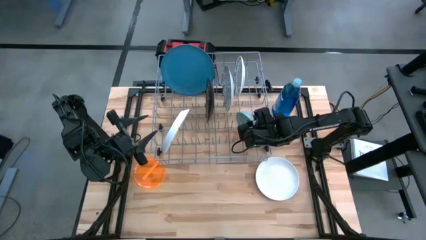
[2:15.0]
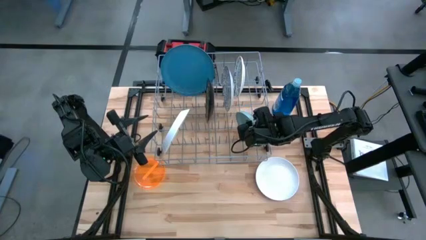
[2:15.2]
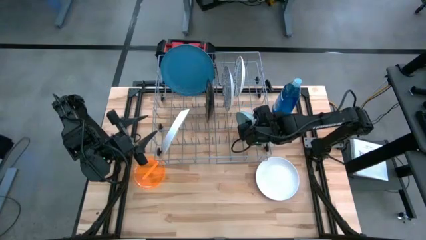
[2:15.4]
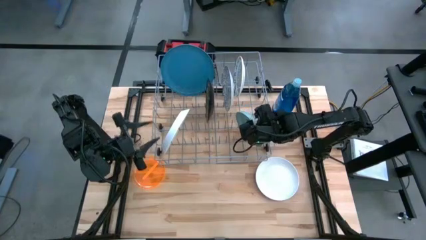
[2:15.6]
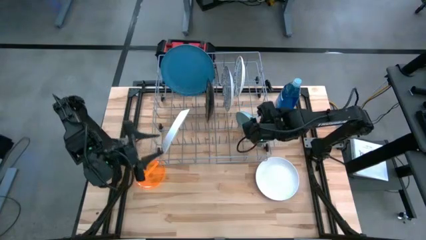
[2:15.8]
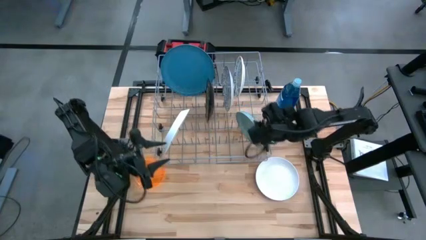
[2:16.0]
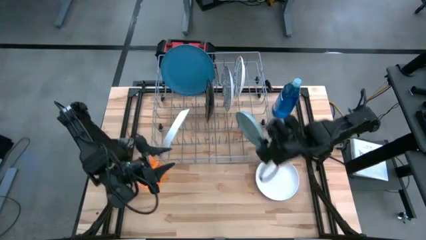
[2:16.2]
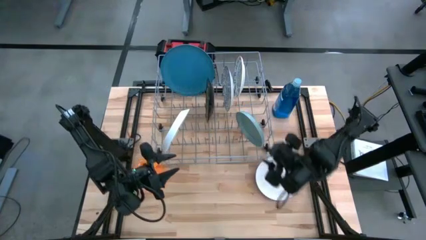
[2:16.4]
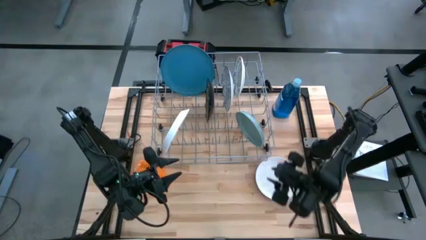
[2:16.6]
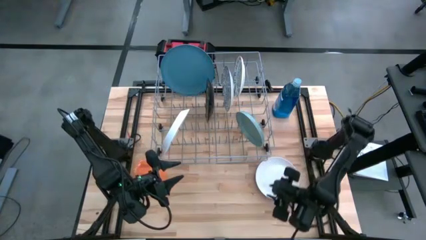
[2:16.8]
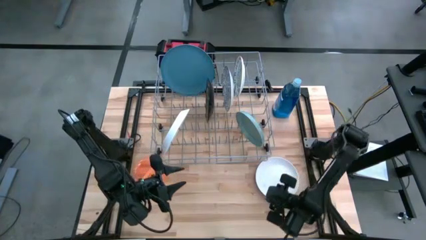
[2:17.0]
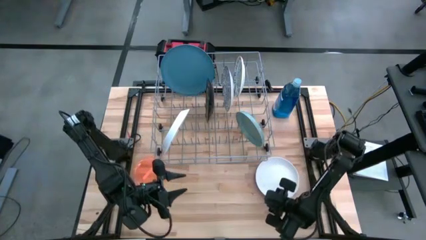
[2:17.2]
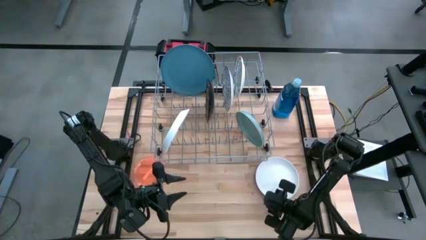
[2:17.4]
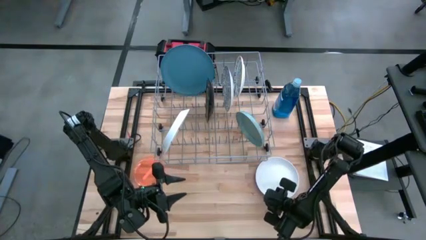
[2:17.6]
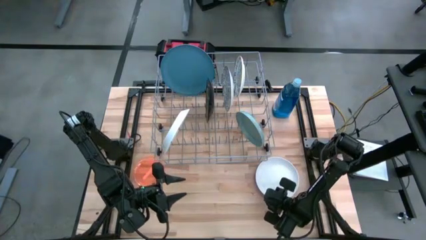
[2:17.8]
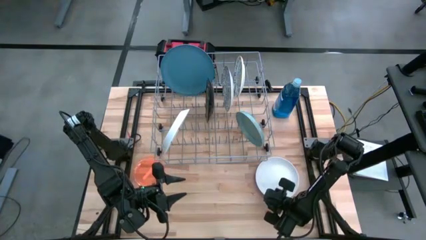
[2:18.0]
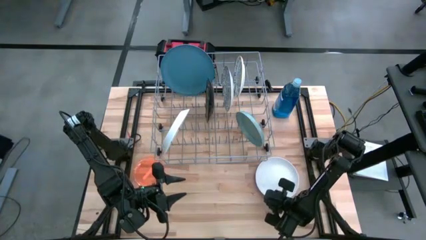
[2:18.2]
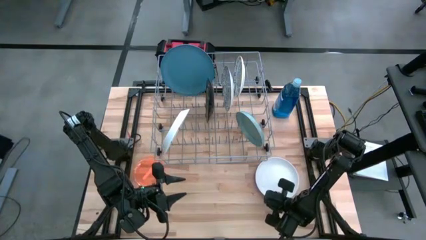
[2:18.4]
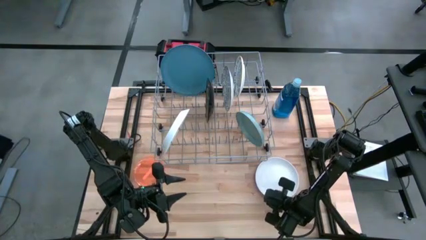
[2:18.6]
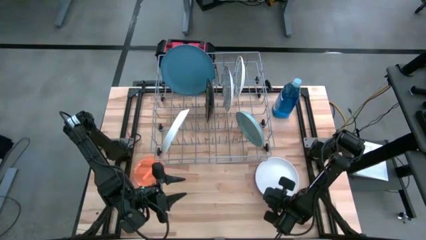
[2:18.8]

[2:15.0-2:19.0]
Task: Sort dishes
Put the white plate in the dish rack

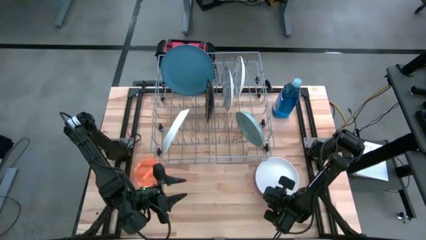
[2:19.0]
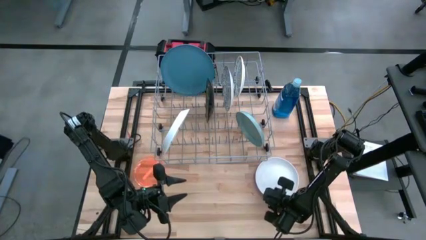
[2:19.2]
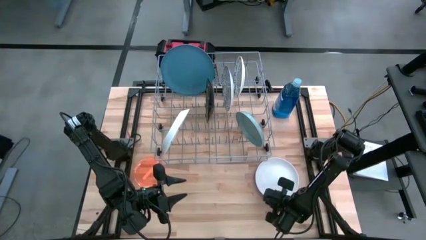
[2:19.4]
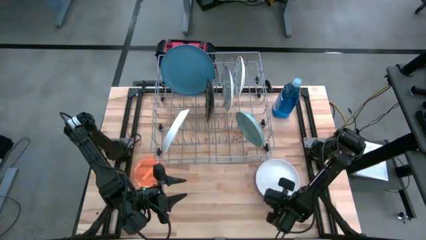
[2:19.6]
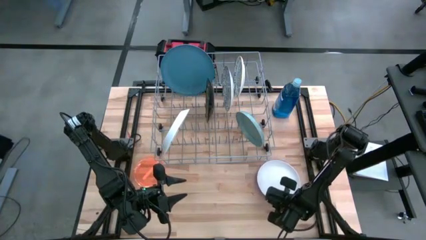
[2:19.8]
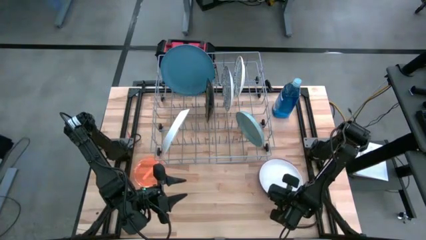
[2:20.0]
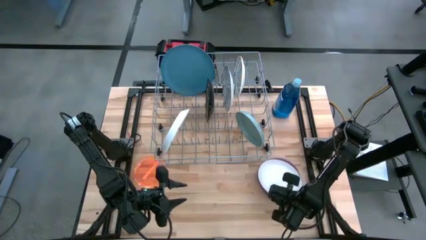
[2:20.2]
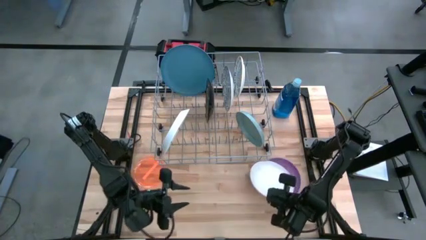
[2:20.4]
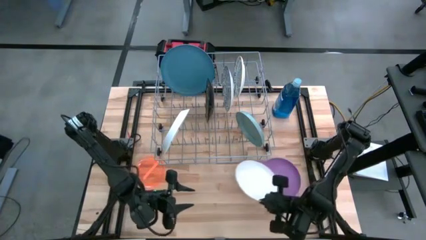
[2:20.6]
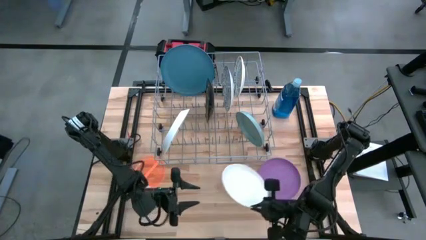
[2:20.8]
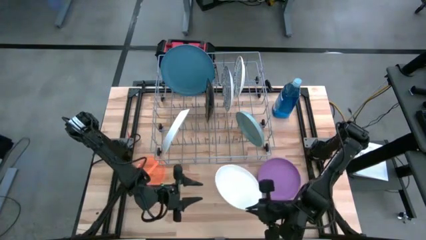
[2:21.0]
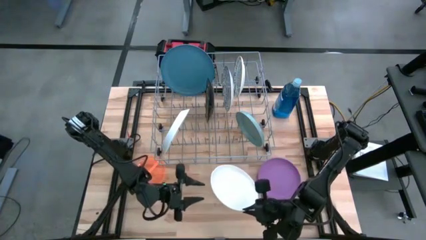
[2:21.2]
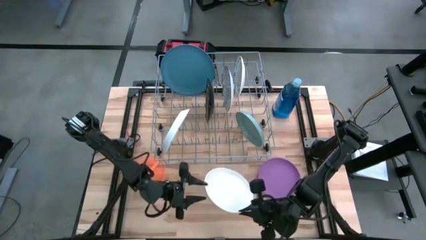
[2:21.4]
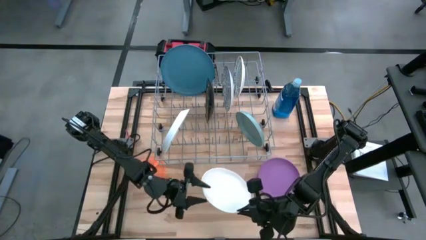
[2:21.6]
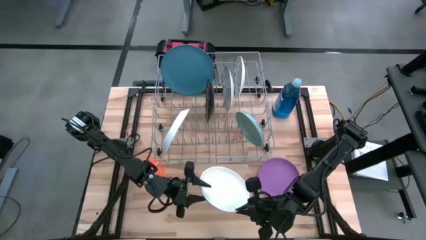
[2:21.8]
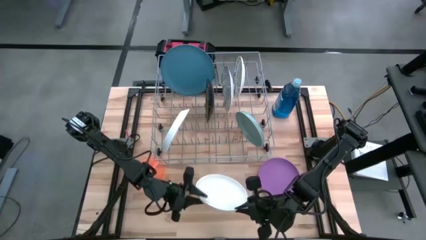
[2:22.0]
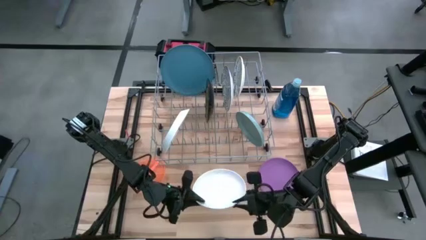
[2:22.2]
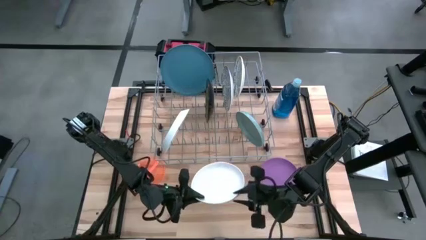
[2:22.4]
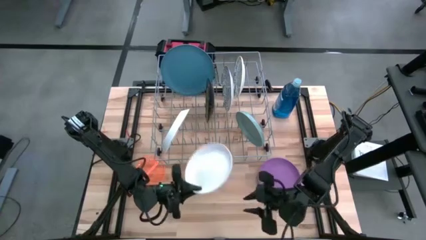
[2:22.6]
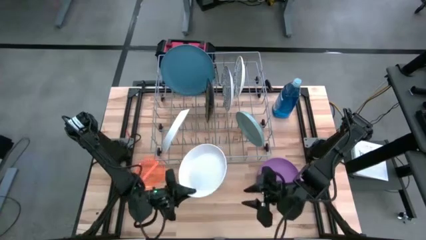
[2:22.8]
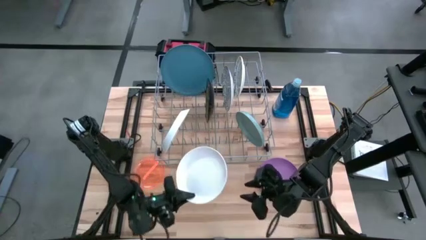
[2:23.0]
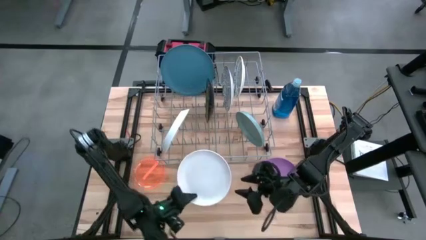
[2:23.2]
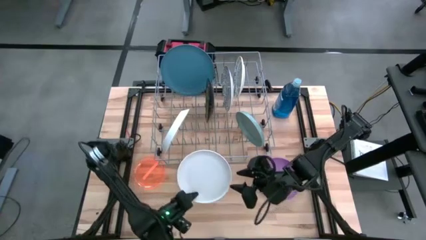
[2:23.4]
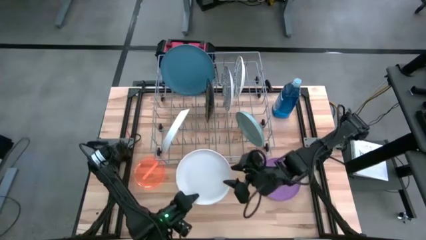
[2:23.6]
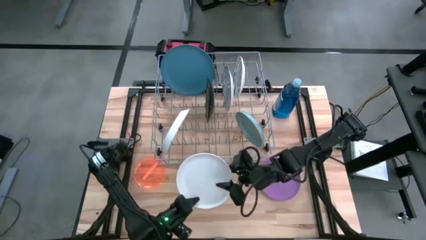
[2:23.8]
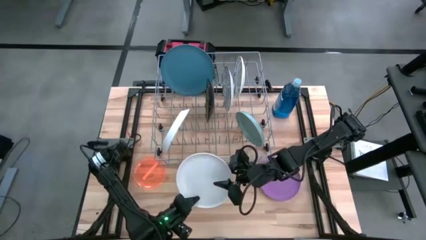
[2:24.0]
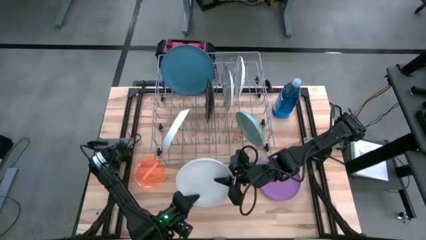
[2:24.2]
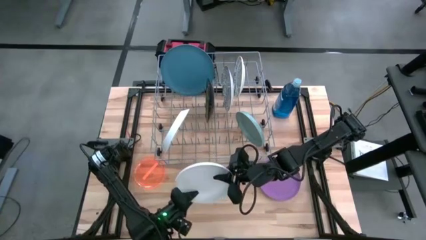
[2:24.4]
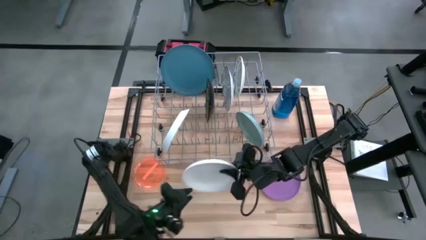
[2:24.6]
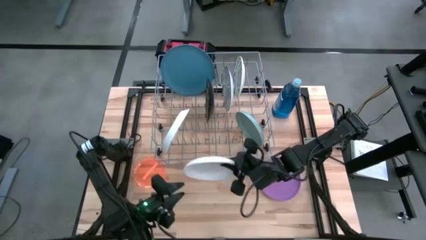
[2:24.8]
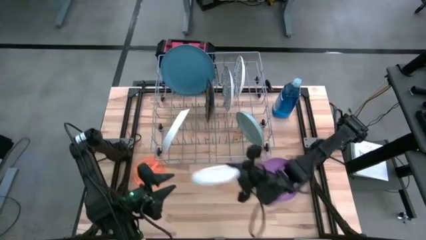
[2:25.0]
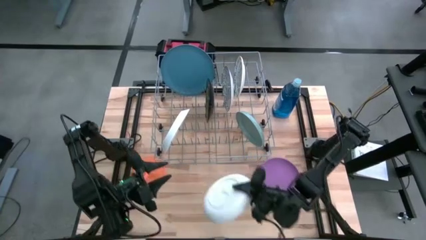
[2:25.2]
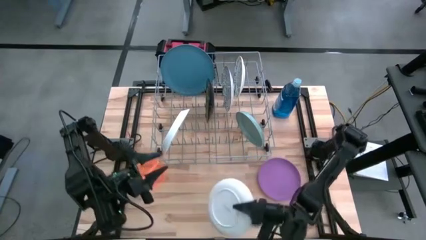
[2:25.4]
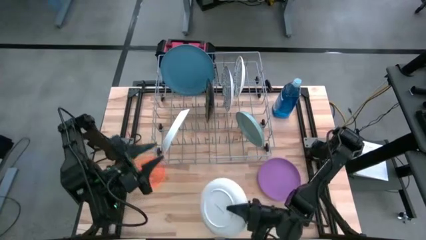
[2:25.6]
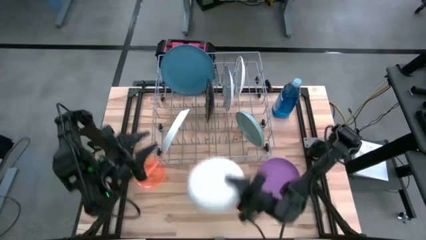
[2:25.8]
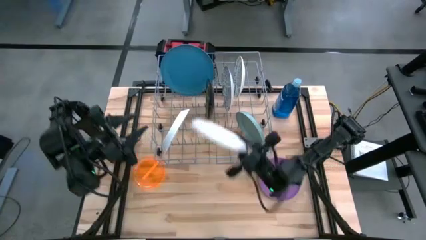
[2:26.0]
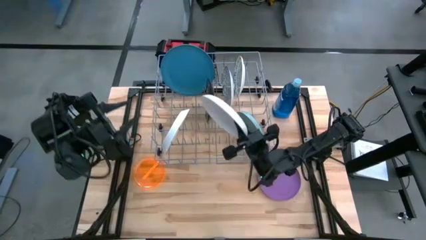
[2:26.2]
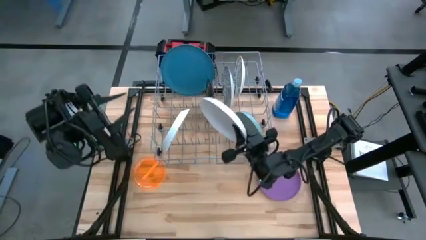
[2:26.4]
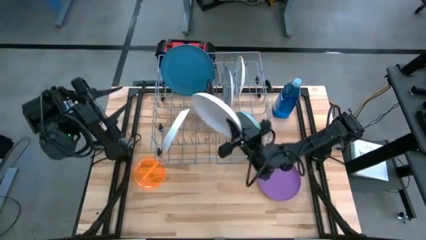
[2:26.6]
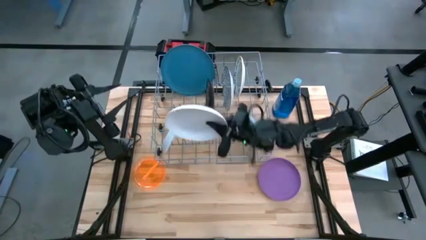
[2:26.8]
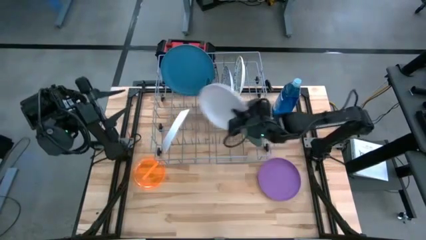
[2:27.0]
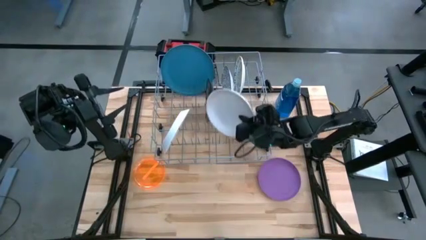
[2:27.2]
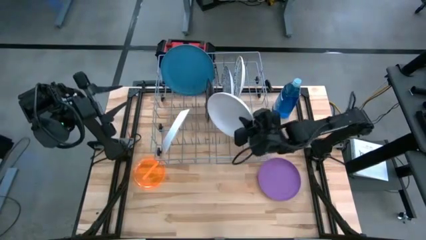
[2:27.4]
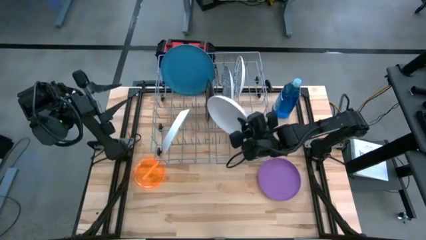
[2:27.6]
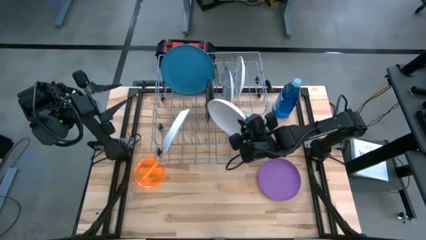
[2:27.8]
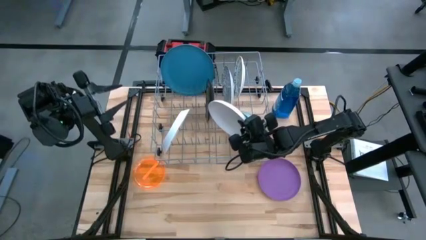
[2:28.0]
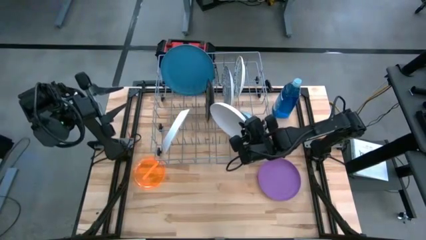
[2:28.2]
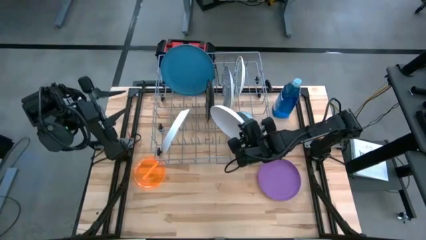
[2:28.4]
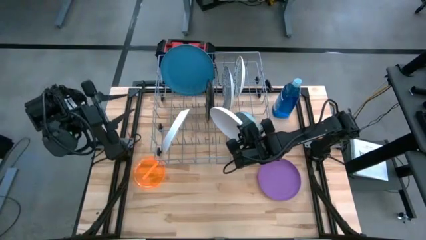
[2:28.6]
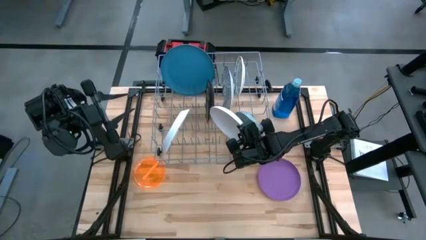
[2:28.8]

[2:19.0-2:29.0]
Put the white plate in the dish rack
